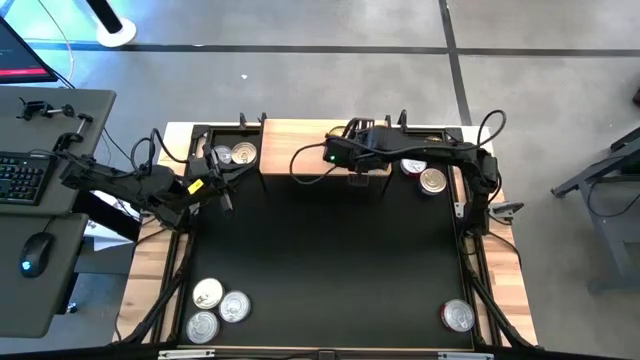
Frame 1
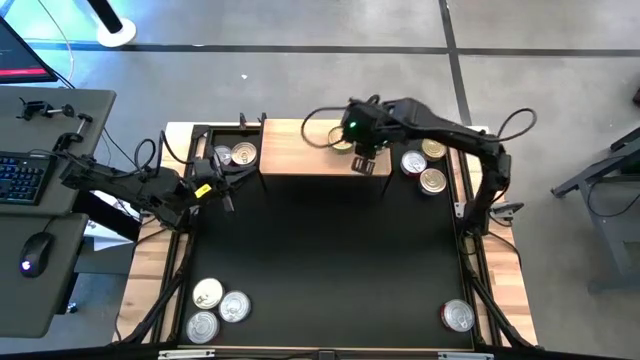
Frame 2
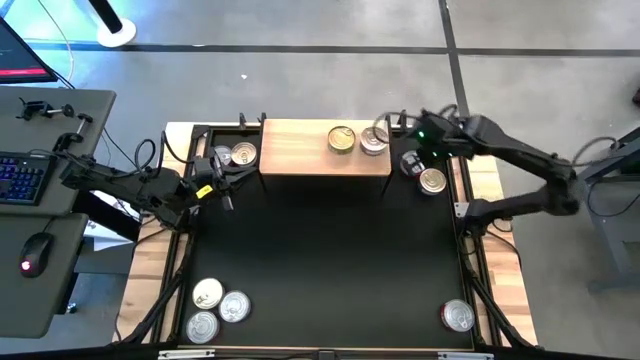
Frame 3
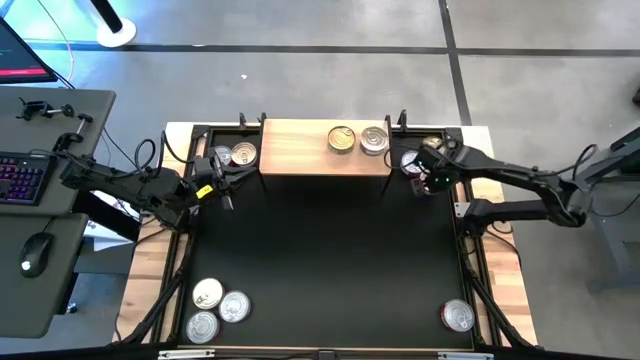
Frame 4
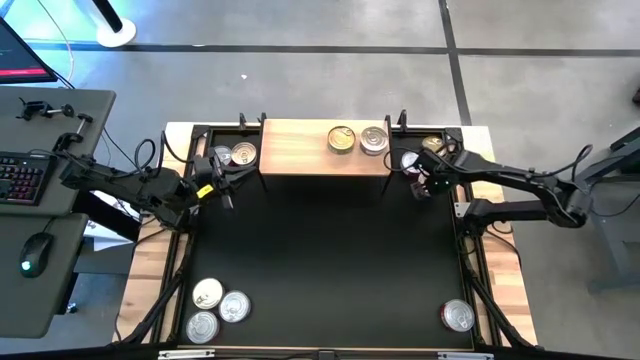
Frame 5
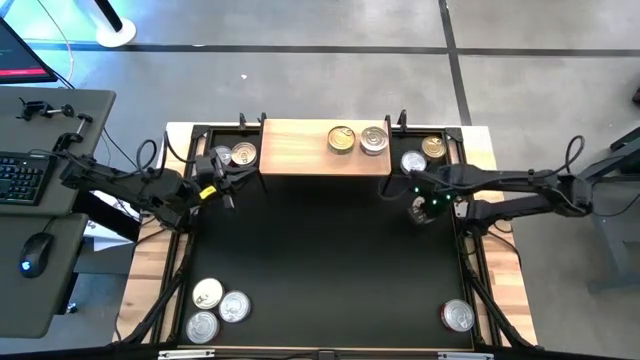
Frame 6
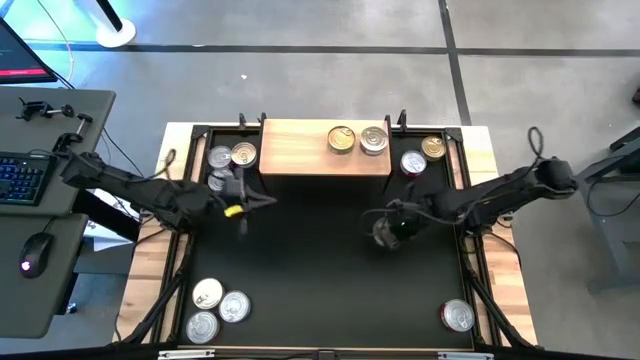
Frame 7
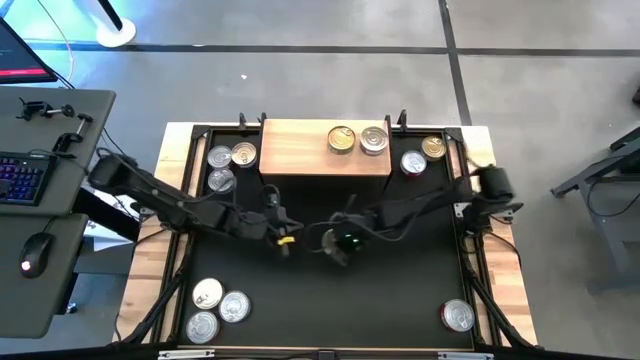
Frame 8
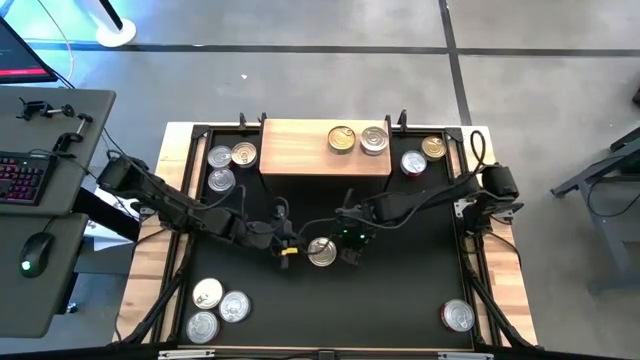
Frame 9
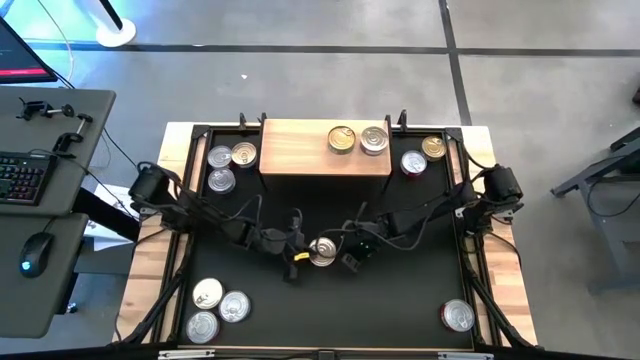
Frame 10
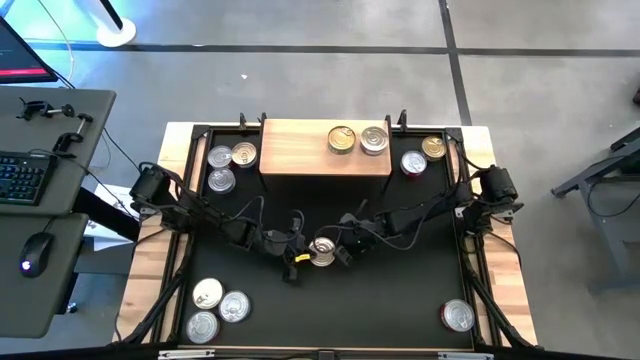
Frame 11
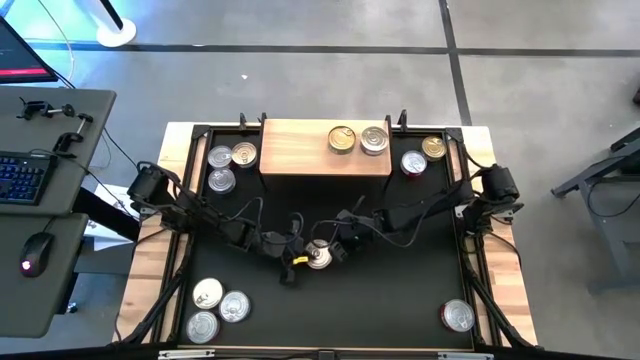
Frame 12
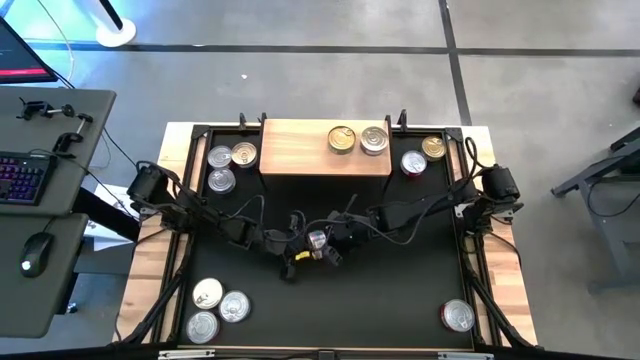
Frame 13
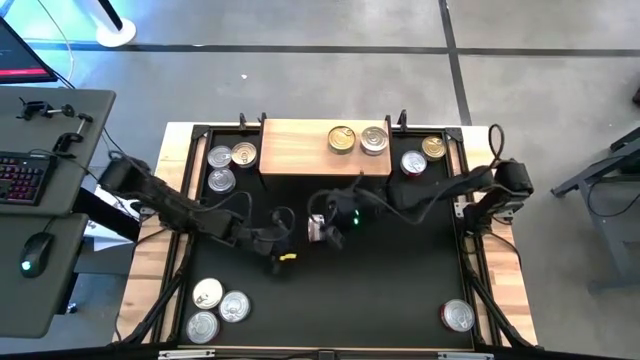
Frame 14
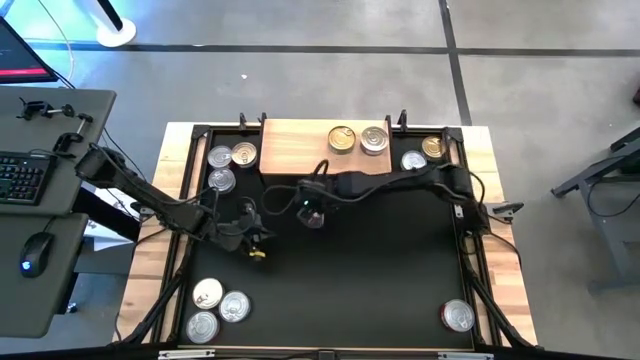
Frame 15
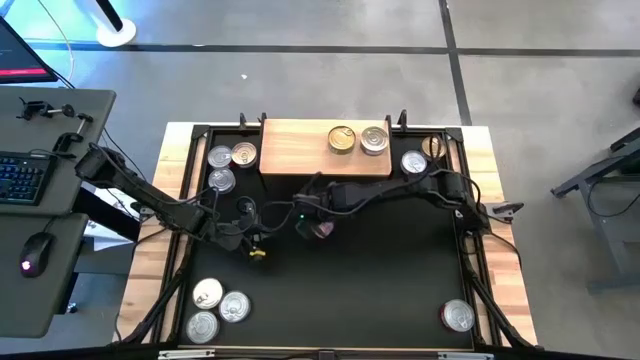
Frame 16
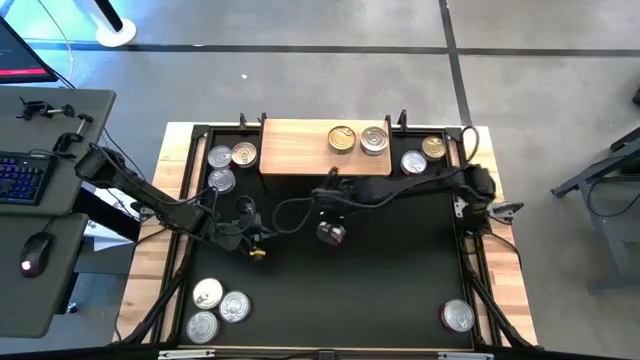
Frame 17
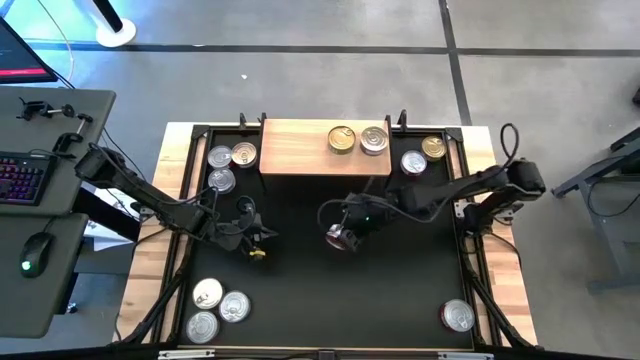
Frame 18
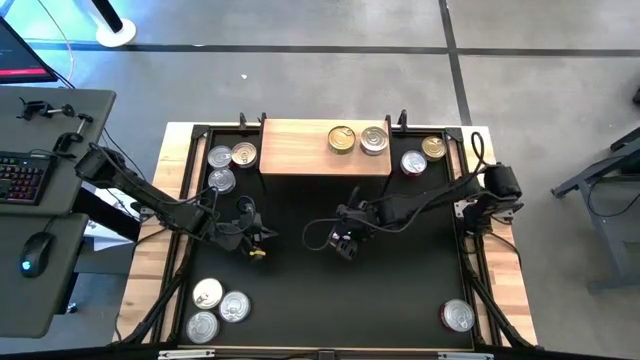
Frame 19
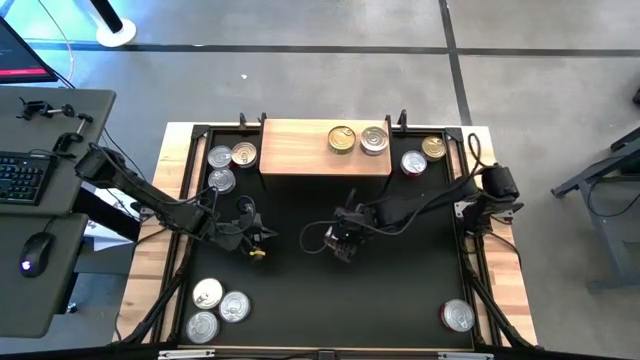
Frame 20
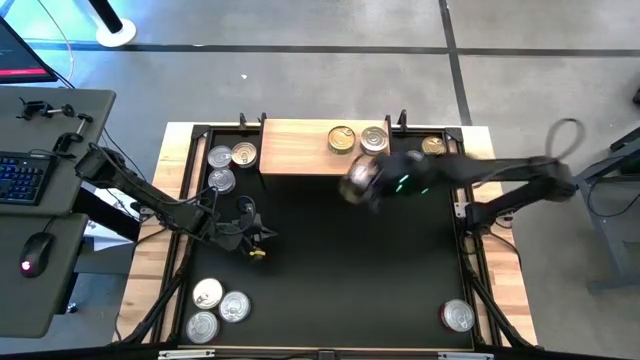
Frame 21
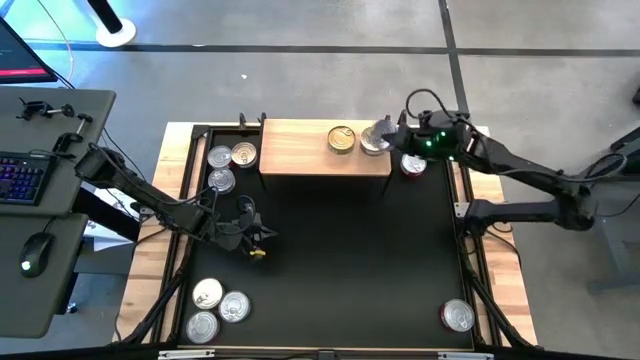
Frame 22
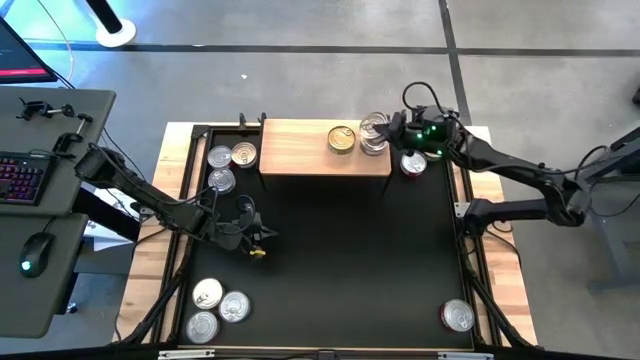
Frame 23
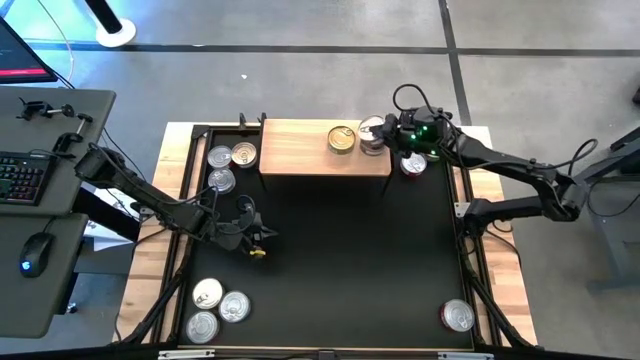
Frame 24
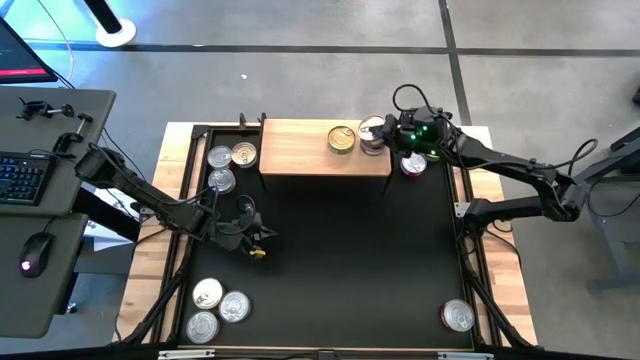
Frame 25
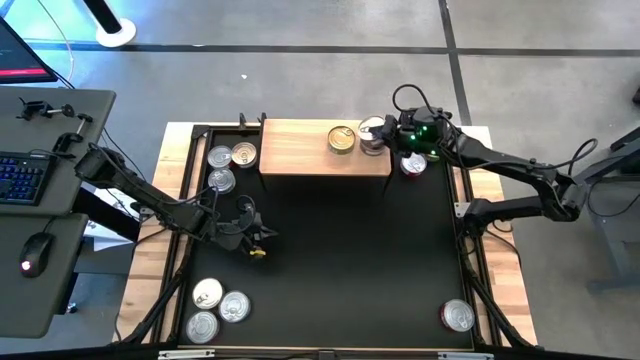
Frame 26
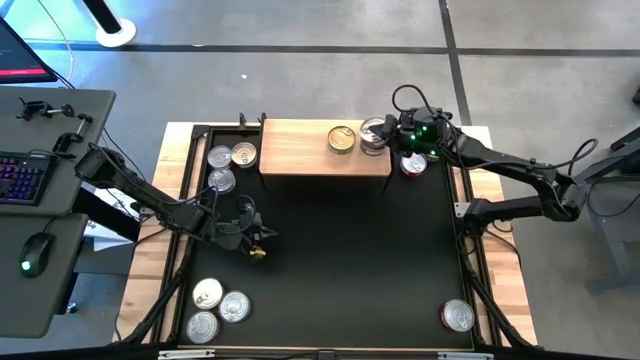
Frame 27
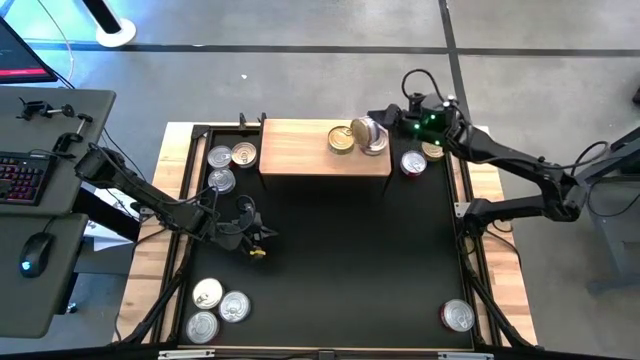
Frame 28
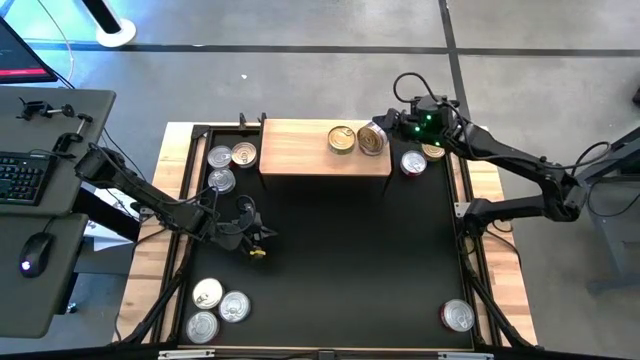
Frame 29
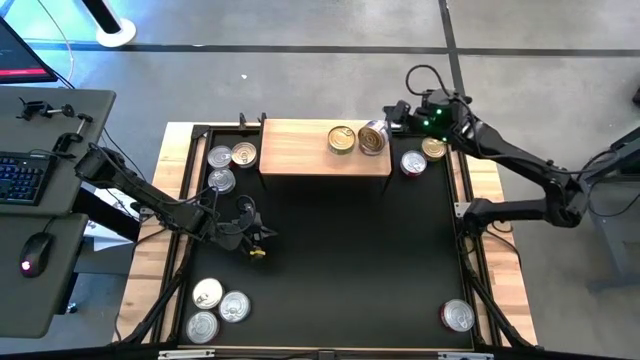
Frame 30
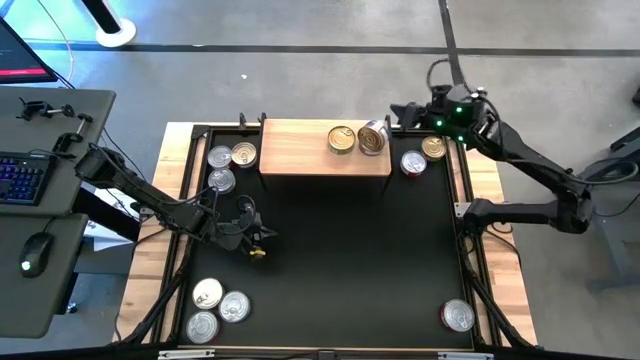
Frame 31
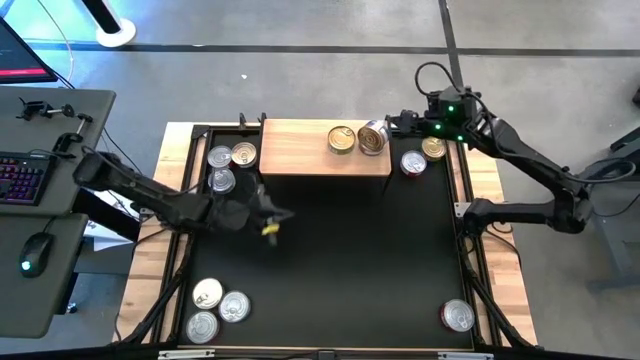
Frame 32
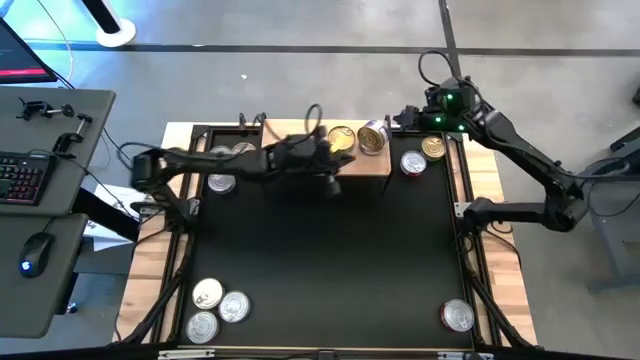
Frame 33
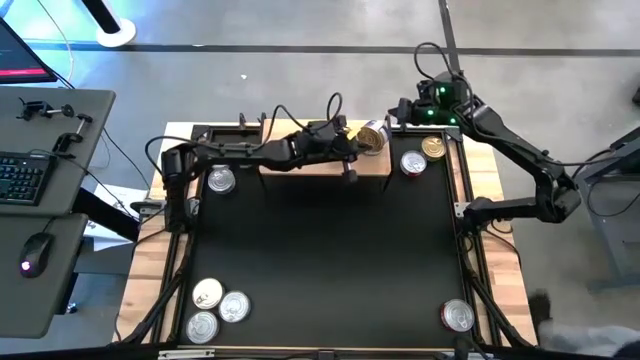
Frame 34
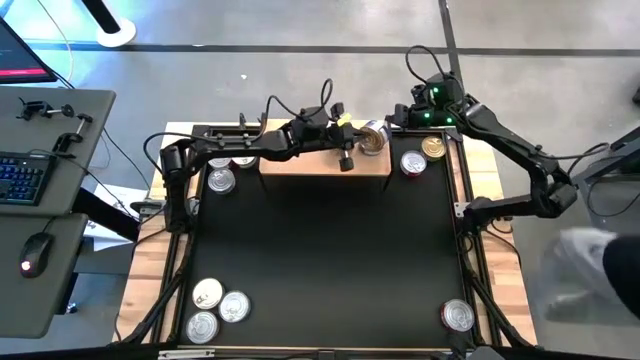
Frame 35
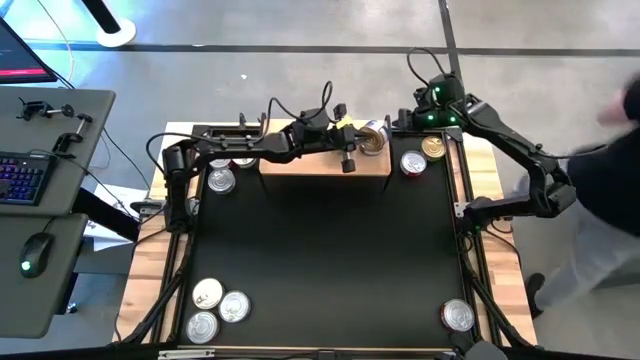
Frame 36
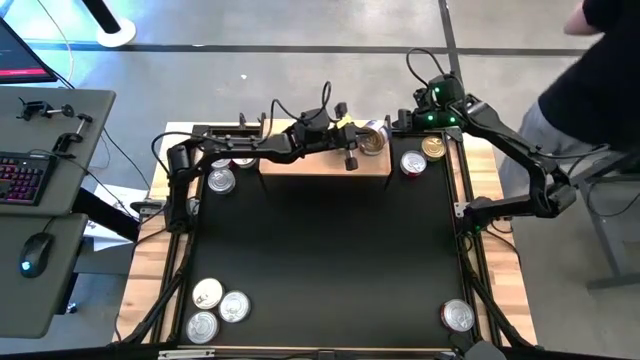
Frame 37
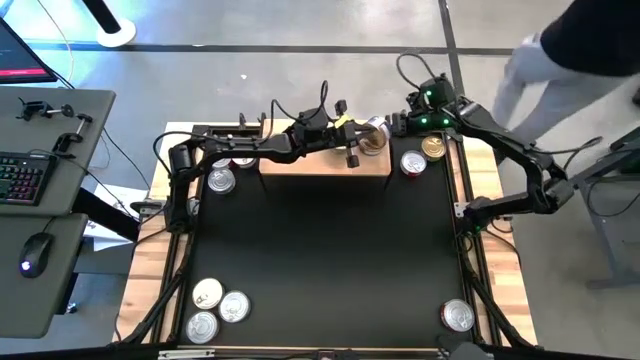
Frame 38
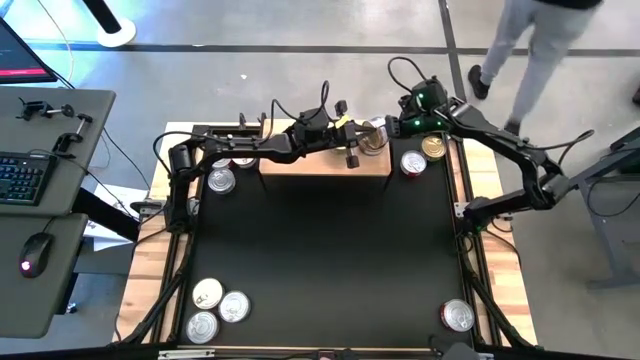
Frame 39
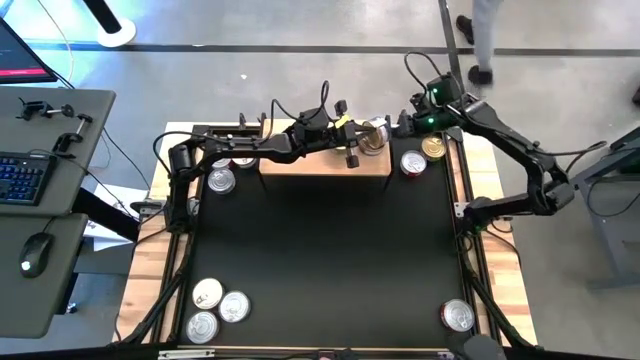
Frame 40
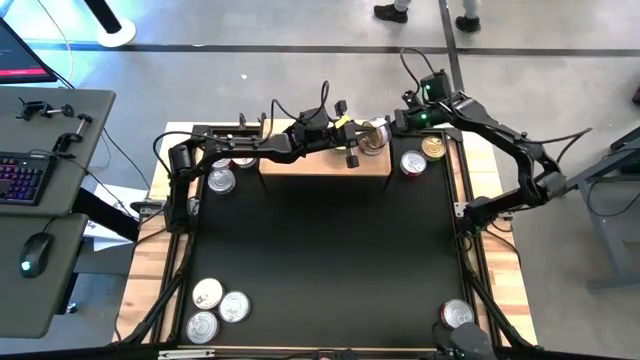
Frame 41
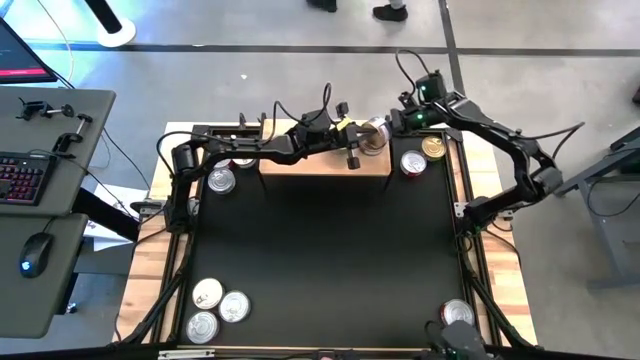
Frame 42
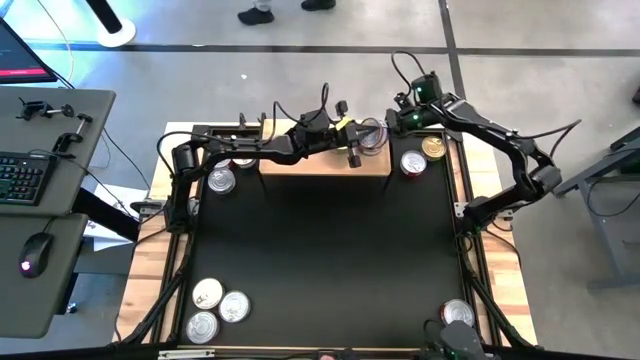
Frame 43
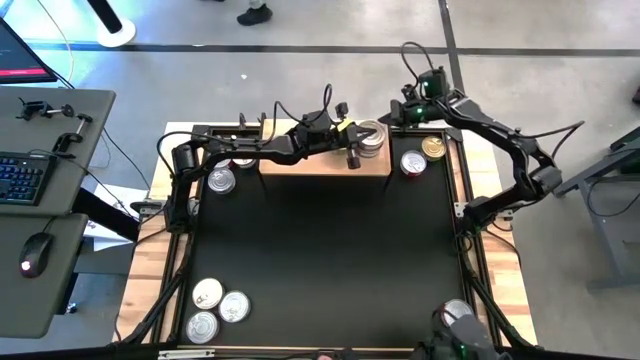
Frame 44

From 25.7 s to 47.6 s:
Task: Stack canned seafood by type on shelf
Stack the top right blue tuna can on top of the other blue tuna can
